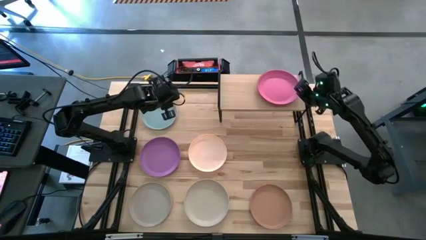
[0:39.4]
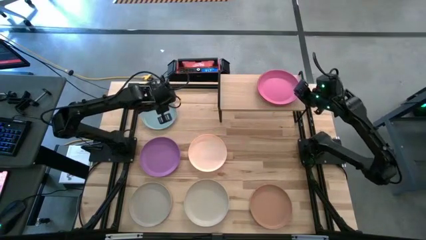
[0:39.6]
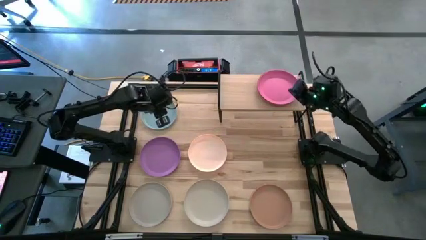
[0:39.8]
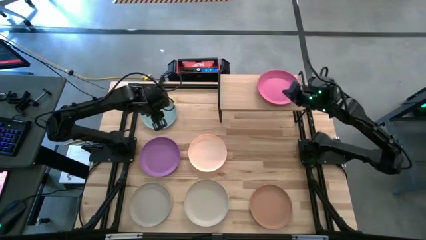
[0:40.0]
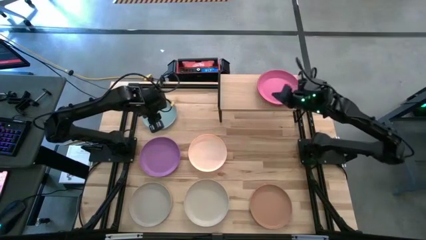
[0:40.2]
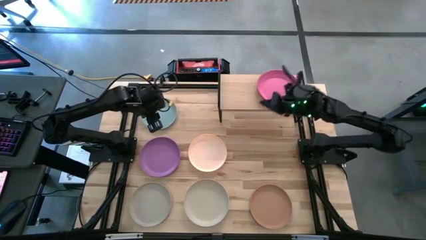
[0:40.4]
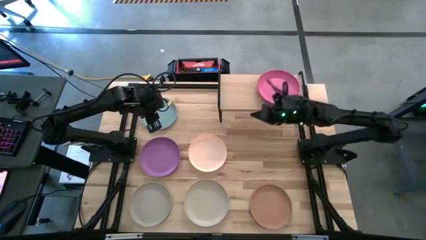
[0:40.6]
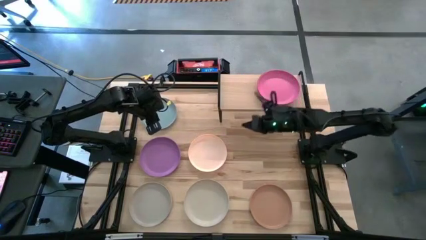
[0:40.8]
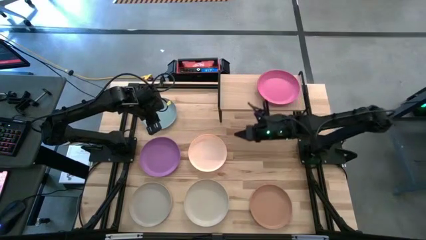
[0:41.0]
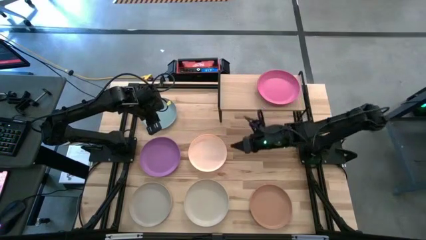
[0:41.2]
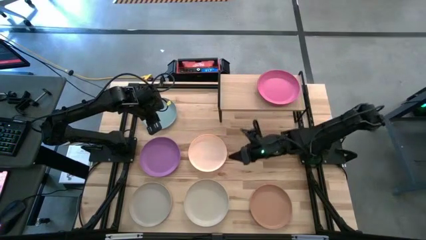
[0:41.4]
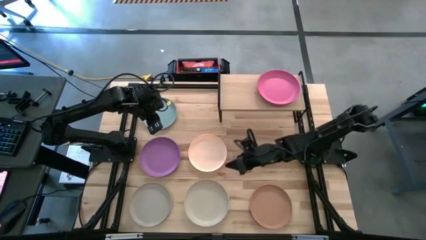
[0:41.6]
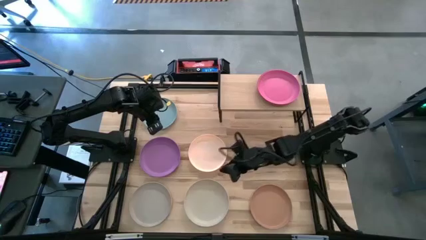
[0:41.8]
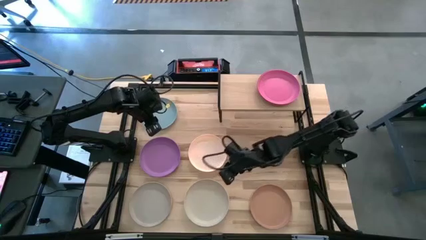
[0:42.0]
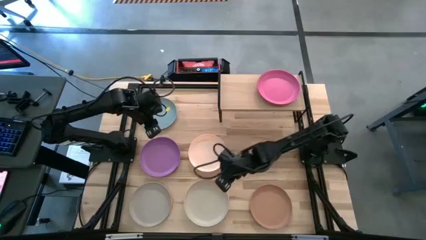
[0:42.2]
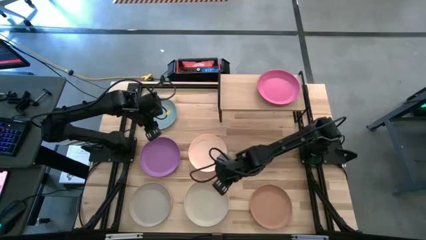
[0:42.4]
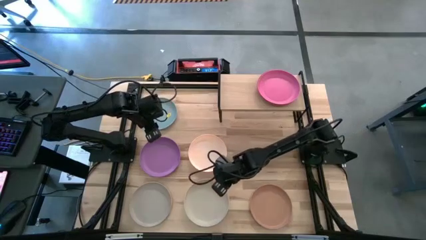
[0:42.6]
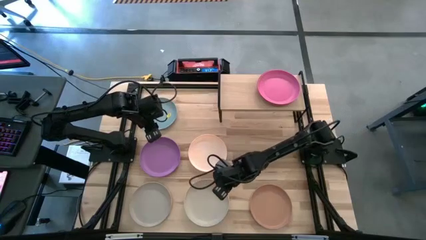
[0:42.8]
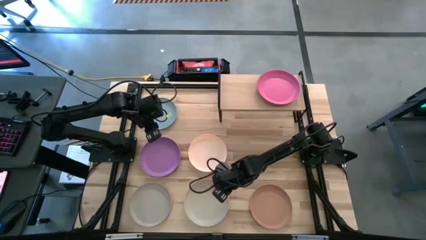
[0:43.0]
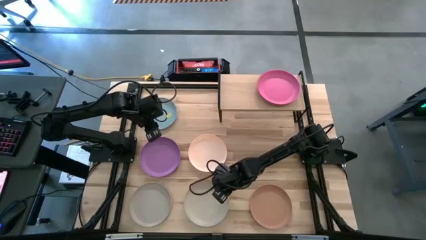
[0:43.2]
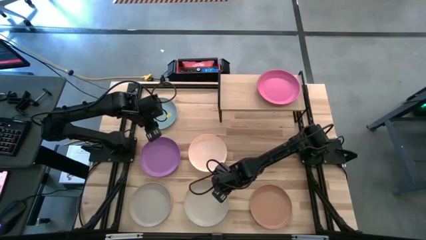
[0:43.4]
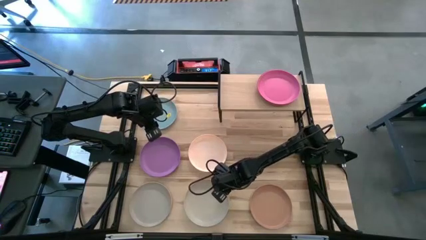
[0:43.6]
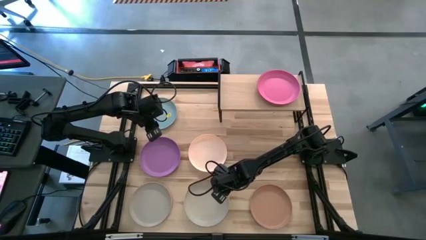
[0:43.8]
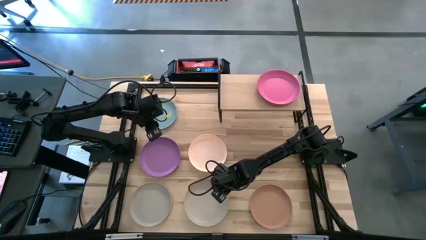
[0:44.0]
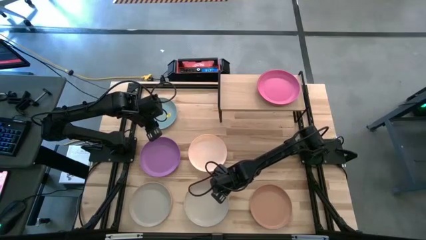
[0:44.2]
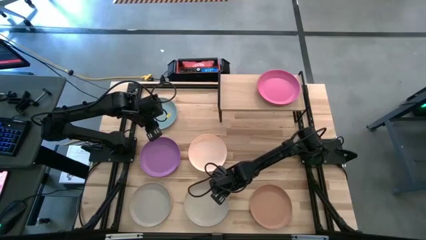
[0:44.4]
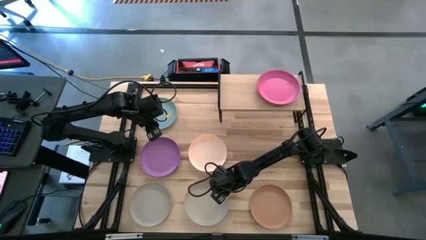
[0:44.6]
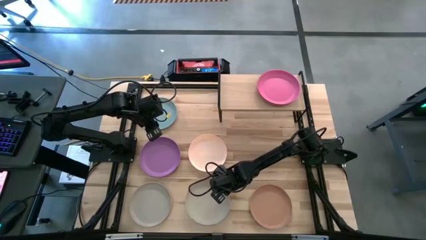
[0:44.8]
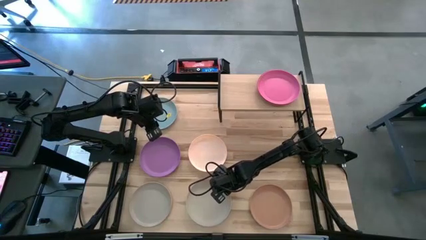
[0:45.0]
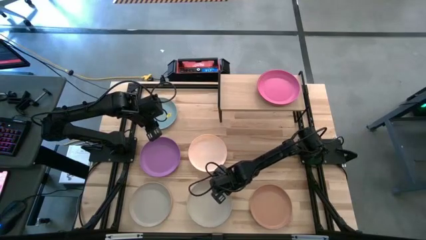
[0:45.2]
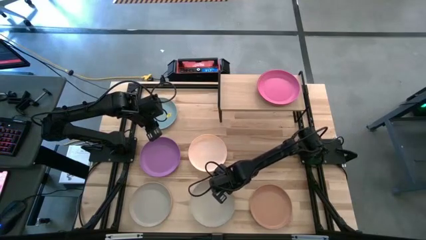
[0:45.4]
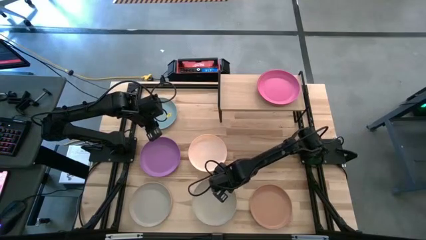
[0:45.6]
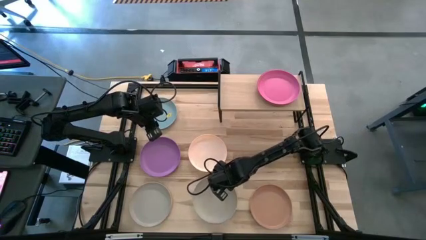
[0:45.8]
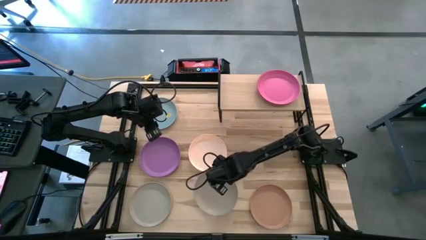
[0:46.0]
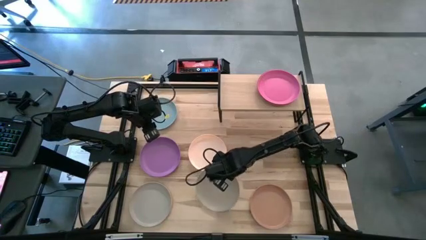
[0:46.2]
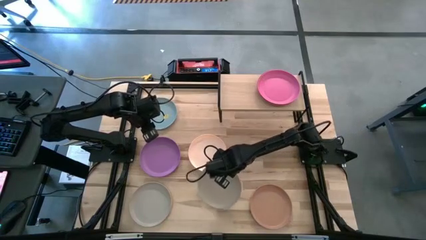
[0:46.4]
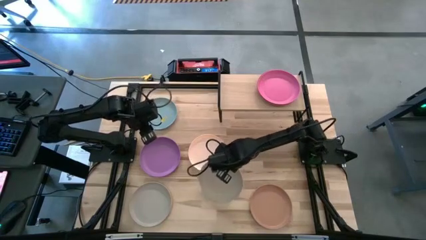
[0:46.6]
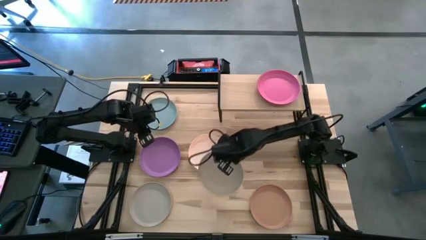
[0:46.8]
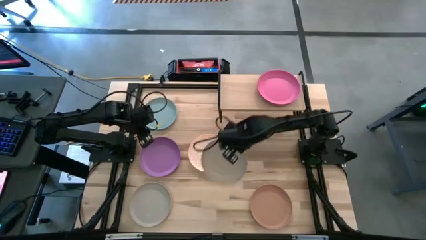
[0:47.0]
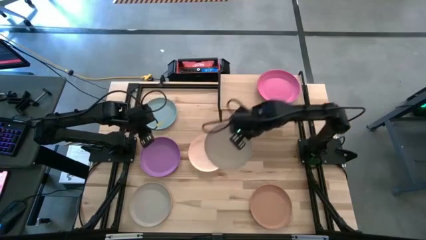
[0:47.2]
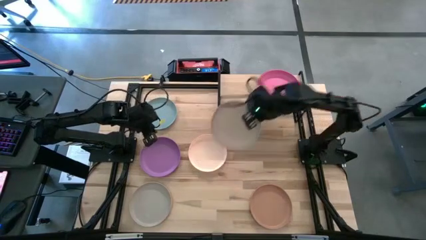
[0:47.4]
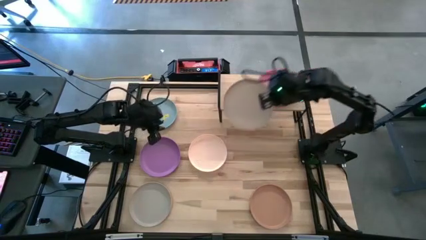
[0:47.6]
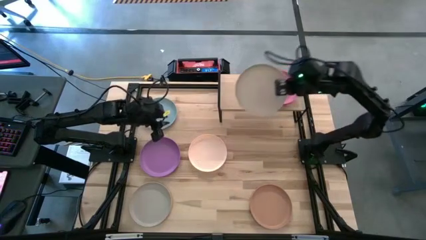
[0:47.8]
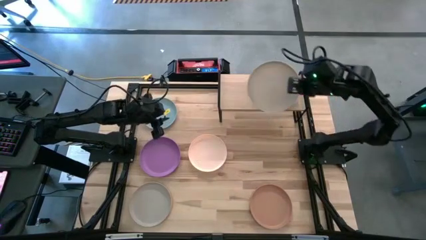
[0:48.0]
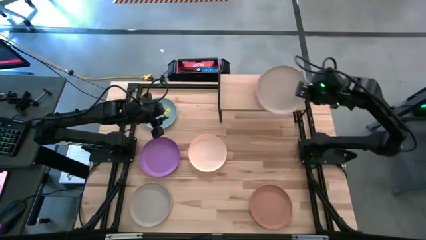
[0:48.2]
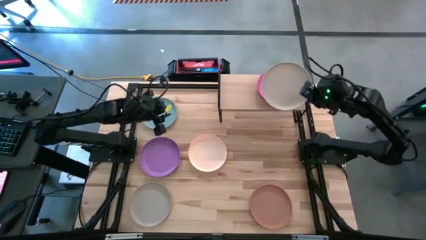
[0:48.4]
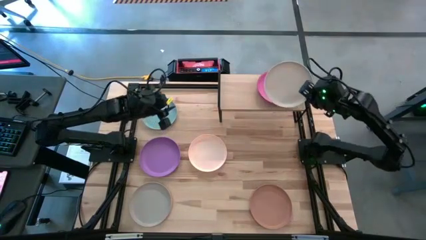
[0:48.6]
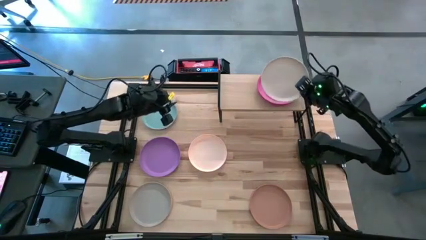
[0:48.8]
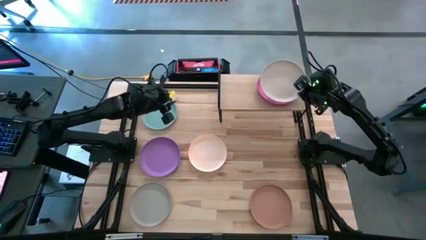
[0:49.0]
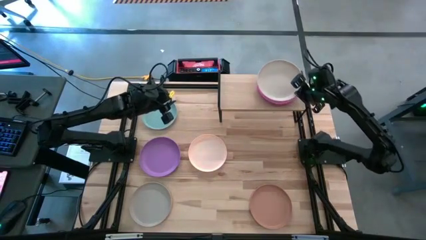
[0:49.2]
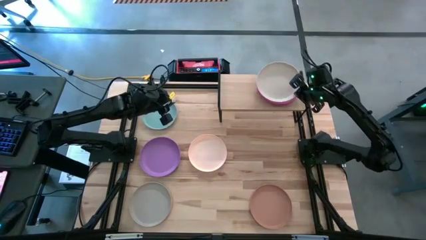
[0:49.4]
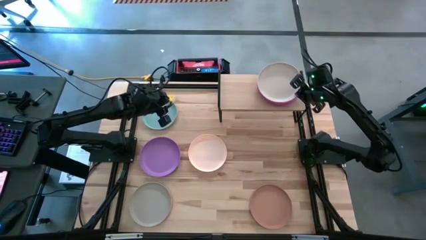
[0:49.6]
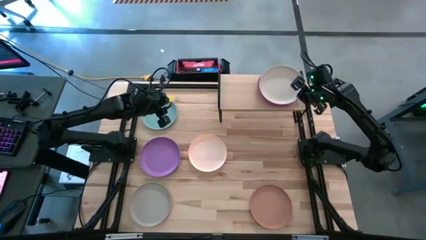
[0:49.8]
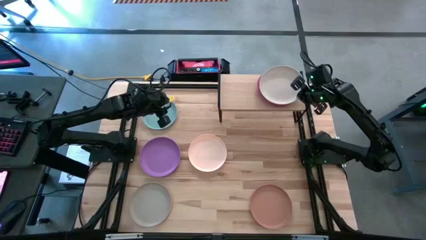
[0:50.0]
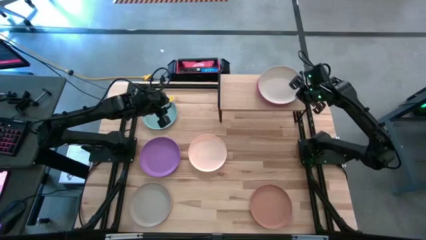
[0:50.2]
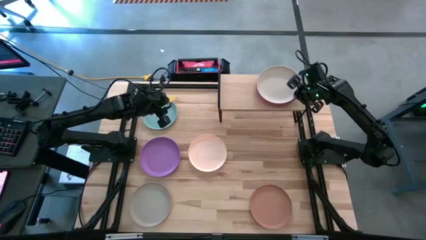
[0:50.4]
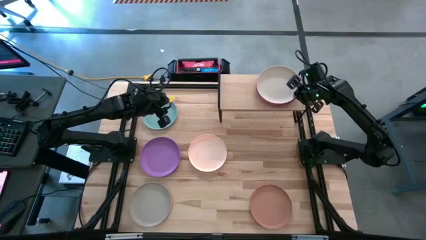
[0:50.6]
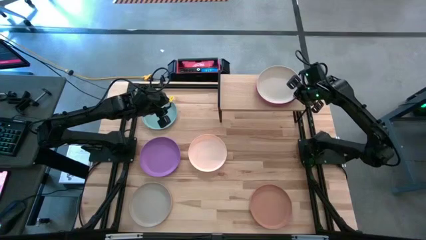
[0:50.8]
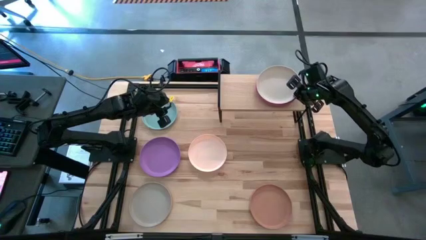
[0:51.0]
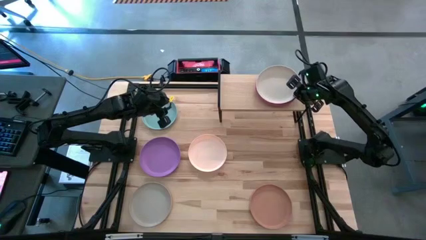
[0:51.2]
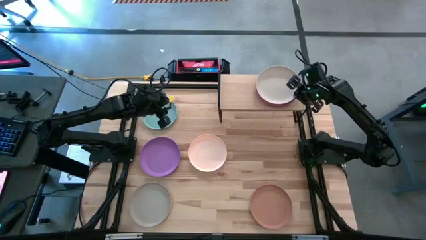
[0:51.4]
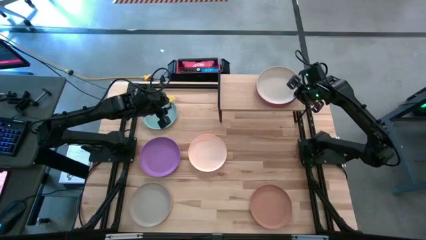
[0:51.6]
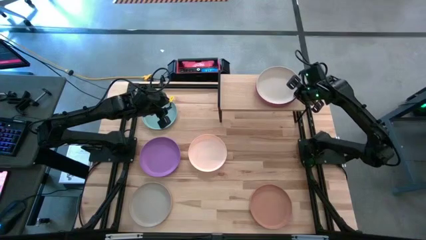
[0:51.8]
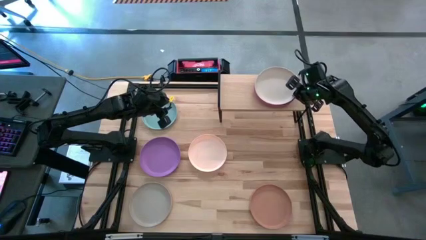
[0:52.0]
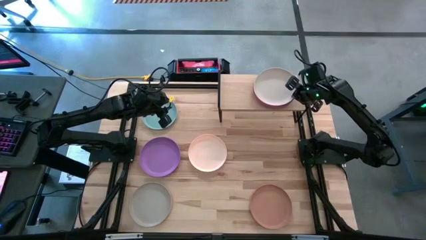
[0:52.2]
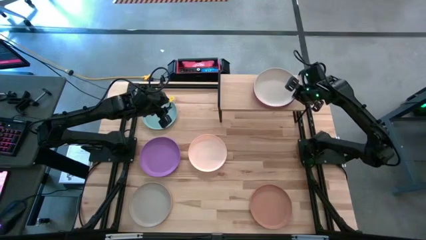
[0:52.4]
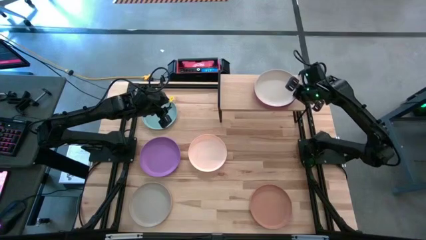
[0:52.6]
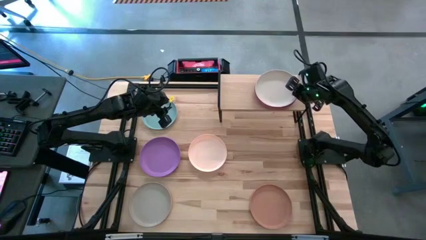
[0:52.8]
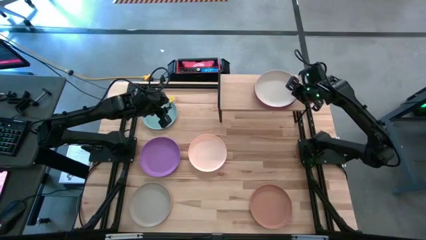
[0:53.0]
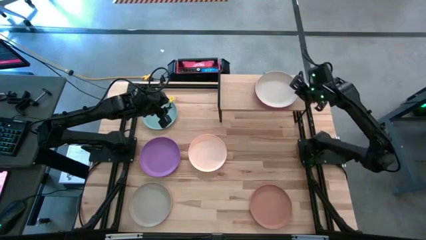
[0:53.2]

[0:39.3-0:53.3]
Task: Place and stack plates onto a shelf
Stack the white plate on top of the pink plate on the shelf
